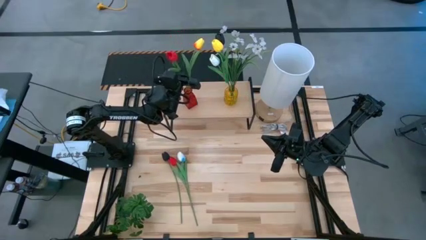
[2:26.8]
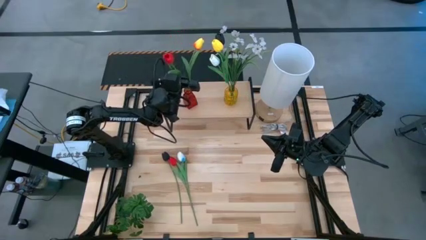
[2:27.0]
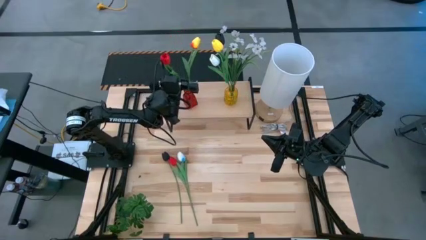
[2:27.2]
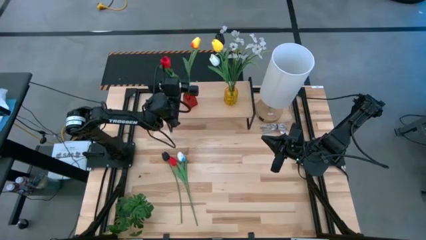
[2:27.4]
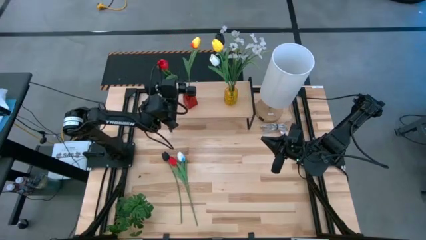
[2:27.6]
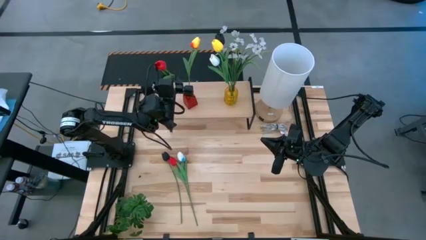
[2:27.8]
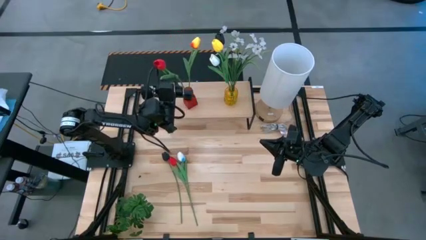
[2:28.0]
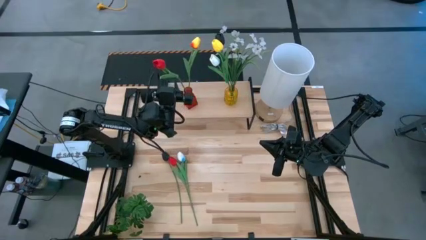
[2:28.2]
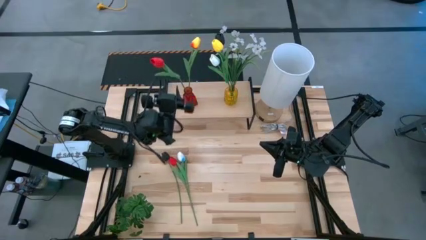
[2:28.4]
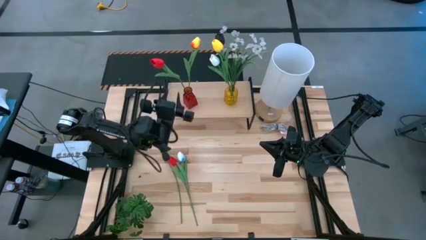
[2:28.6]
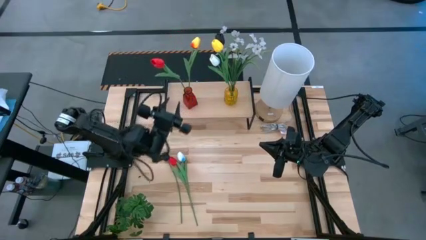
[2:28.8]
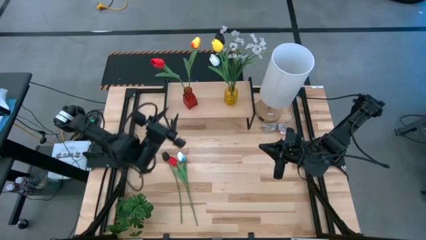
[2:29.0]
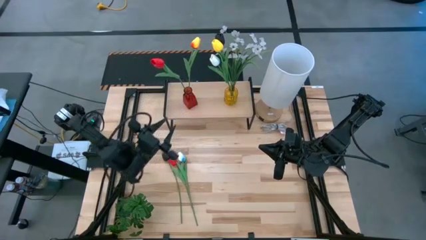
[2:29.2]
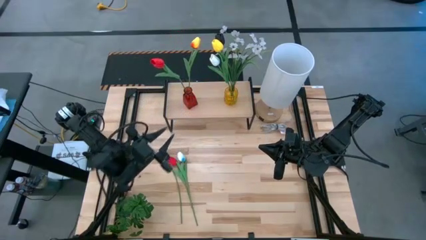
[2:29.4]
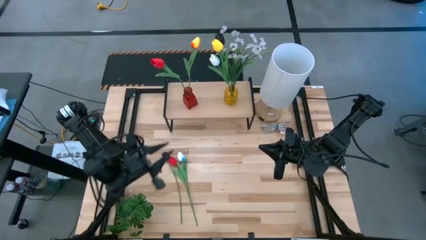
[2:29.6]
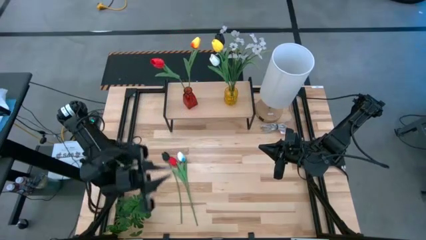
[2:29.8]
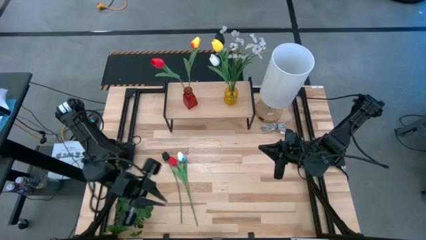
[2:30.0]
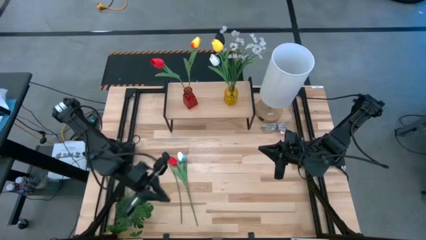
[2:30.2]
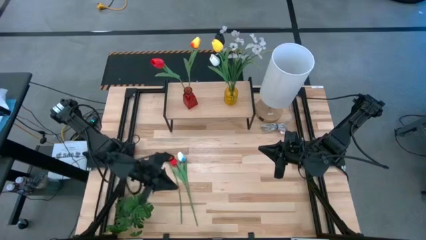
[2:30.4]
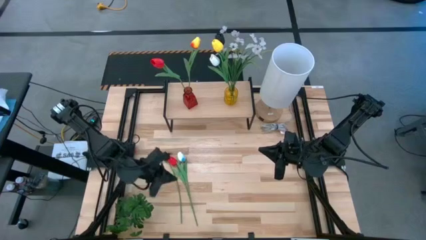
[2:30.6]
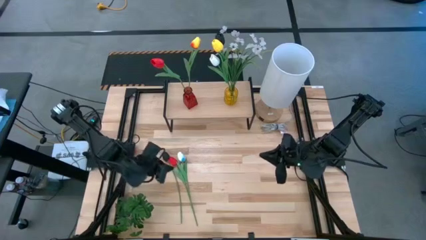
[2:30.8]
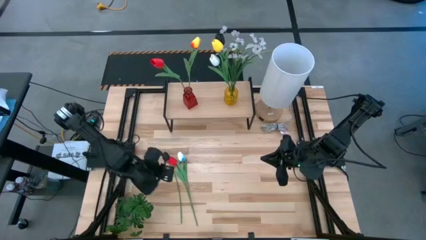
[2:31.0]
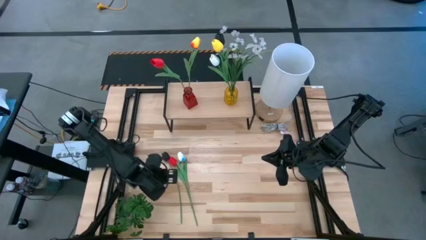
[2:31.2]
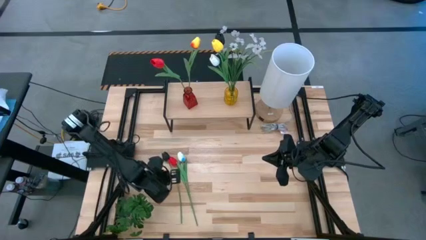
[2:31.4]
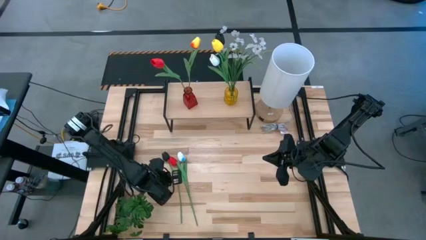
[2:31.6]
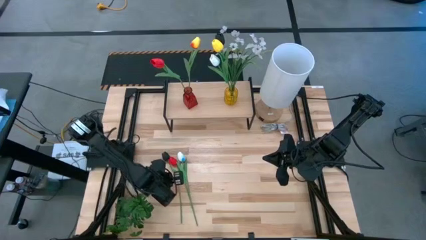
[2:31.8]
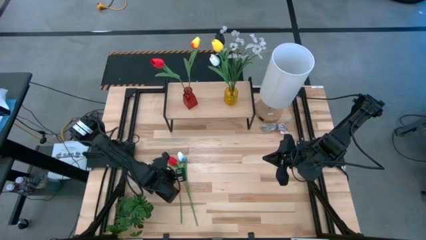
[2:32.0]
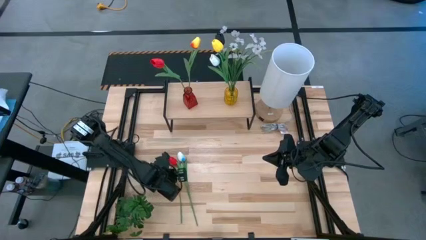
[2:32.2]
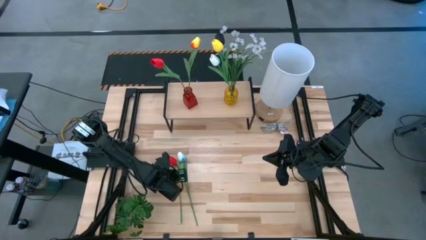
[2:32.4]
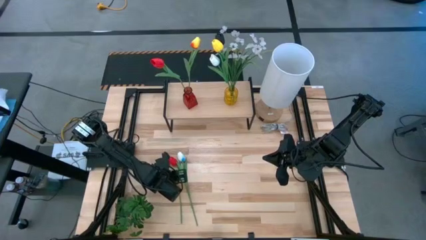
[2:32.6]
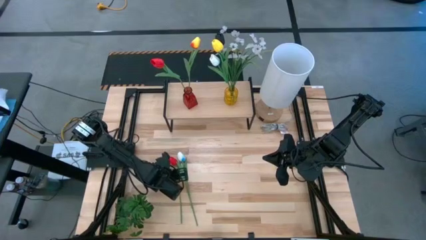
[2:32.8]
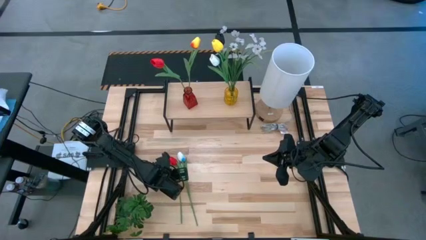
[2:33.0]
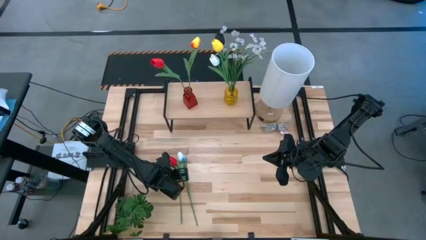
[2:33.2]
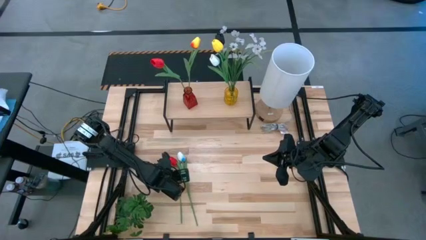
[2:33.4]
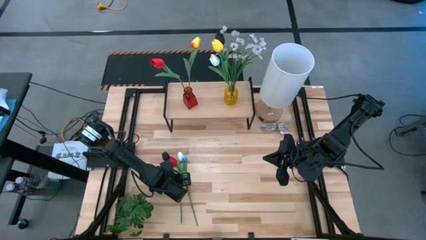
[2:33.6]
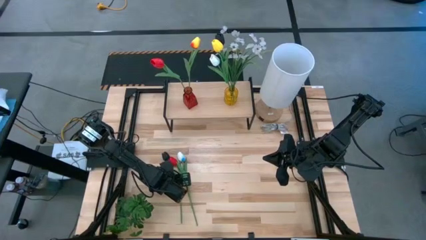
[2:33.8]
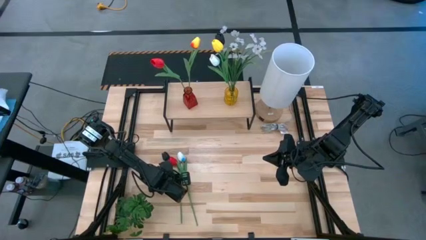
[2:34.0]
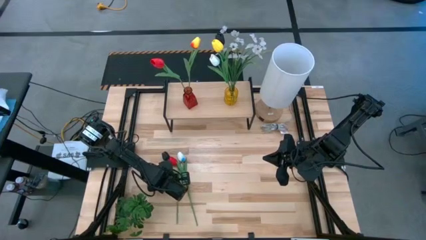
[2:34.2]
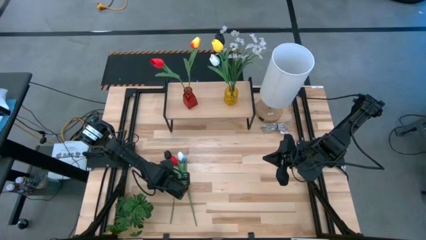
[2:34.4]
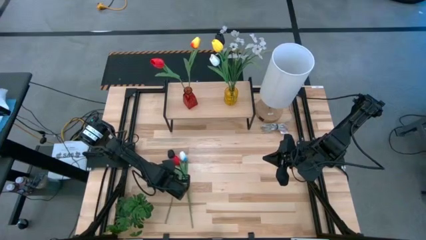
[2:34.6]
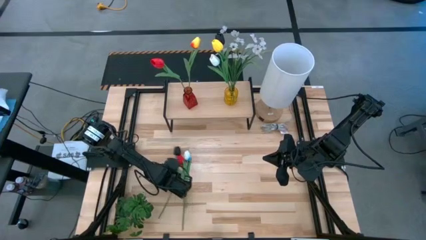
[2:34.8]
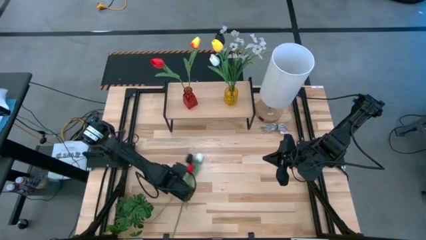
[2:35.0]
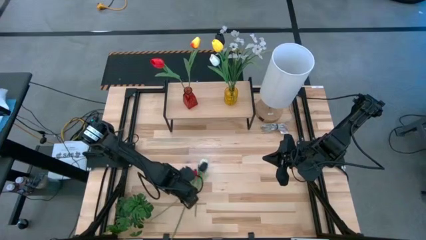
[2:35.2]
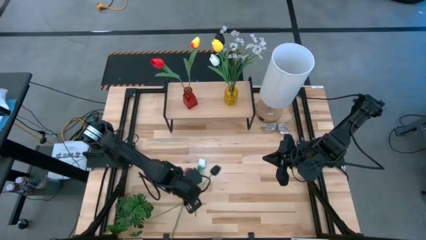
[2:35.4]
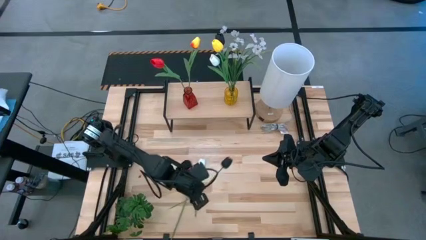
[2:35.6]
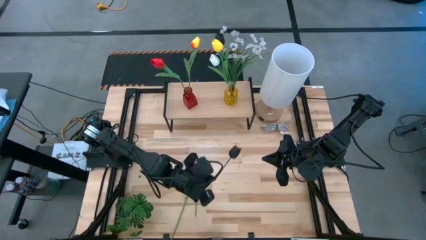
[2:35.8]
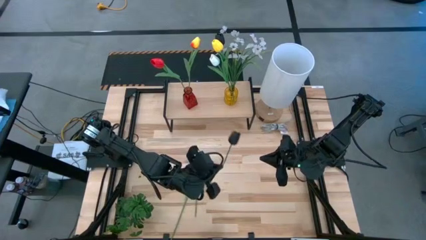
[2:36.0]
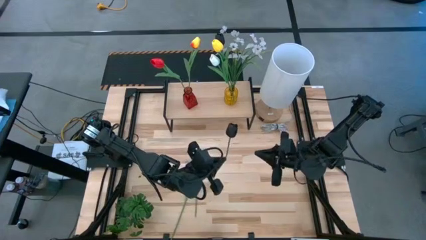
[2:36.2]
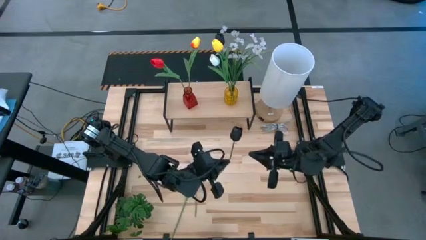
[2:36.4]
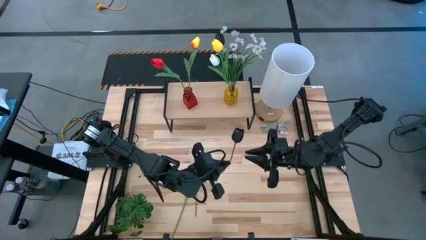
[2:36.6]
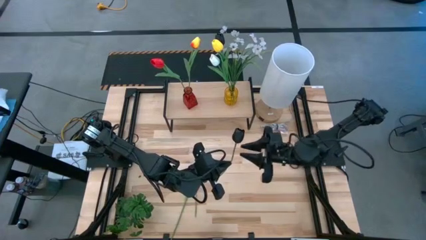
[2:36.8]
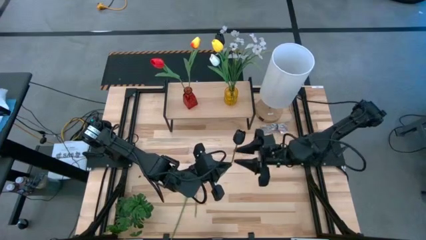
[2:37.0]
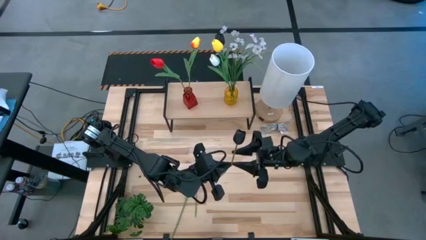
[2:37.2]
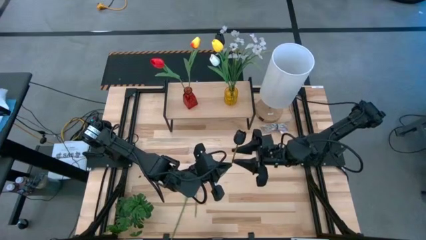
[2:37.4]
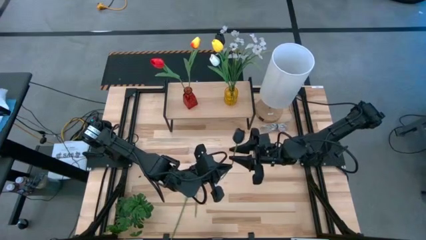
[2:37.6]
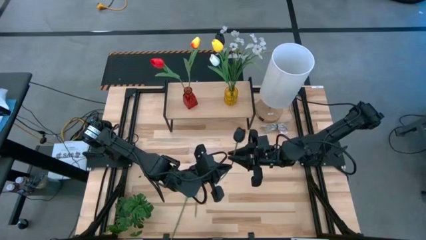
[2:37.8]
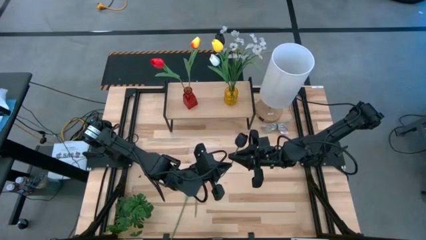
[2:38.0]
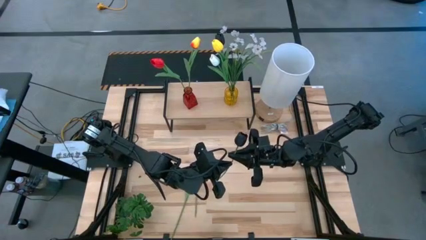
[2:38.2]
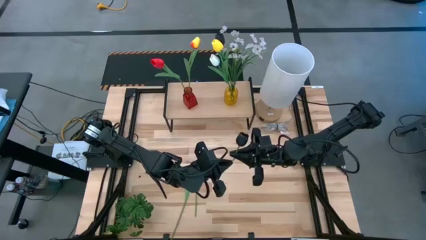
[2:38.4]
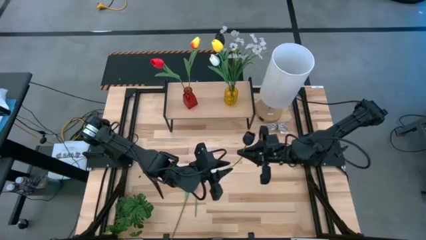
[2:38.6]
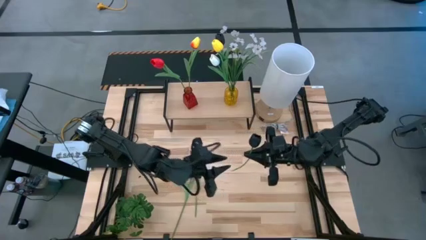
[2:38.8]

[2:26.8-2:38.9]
Task: Pick and place flowers into a vace then onto a shelf
Put the black tulip into the red flower vase

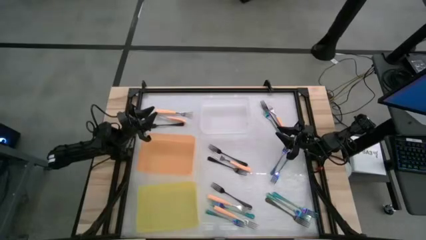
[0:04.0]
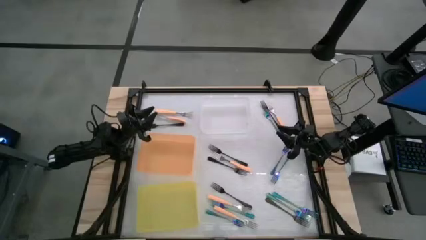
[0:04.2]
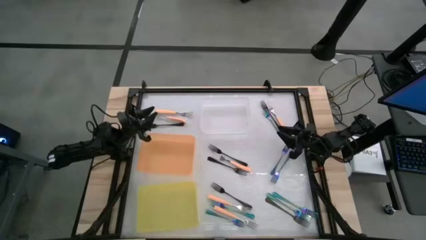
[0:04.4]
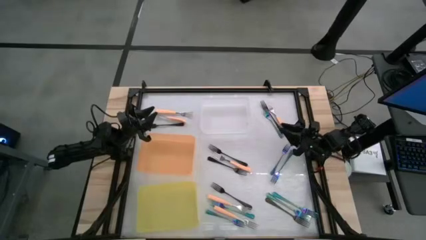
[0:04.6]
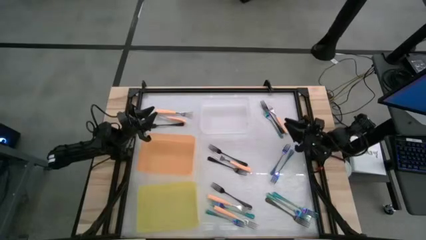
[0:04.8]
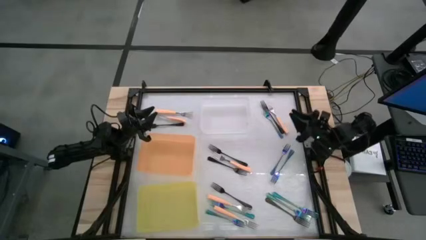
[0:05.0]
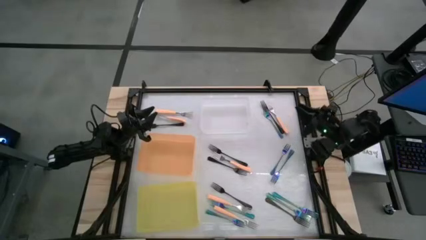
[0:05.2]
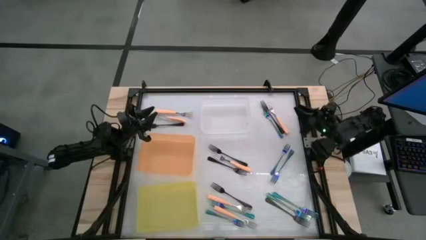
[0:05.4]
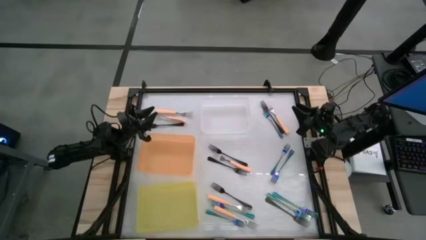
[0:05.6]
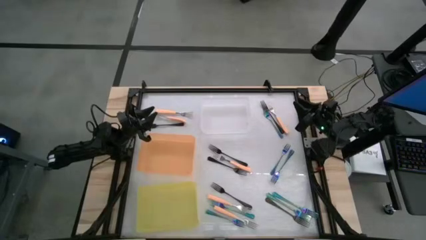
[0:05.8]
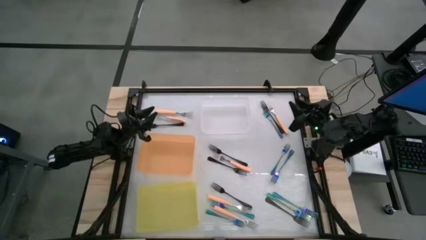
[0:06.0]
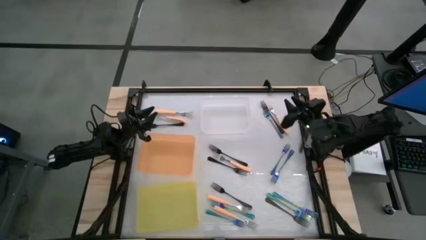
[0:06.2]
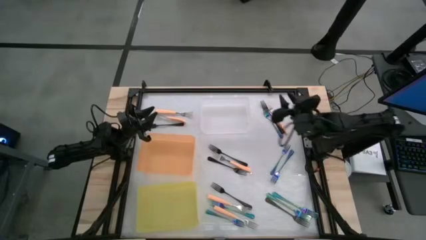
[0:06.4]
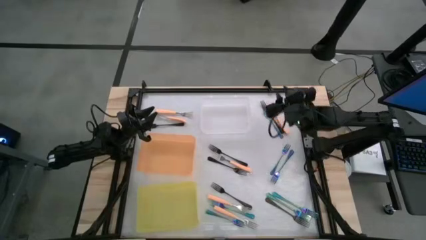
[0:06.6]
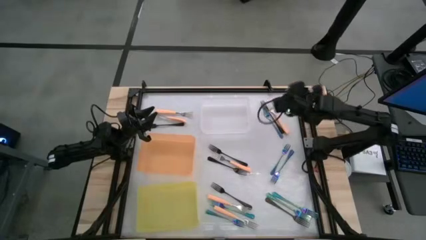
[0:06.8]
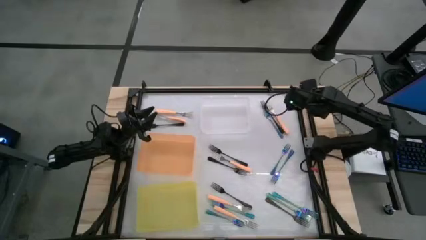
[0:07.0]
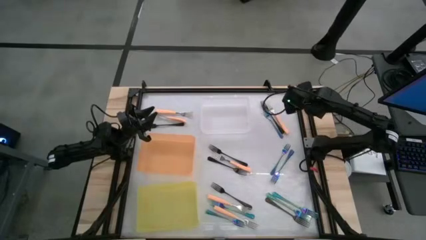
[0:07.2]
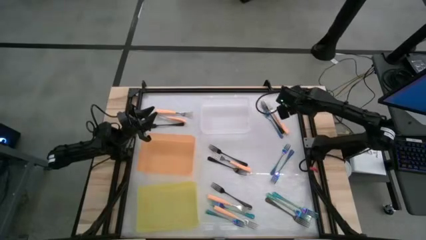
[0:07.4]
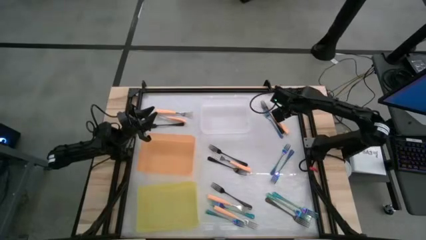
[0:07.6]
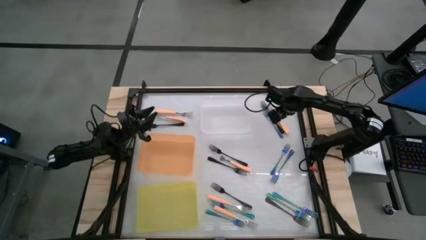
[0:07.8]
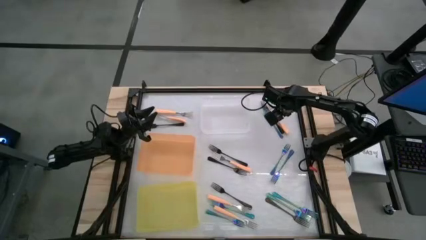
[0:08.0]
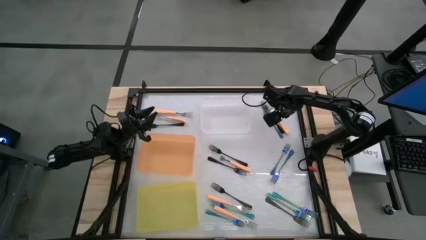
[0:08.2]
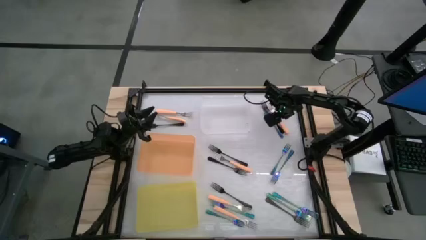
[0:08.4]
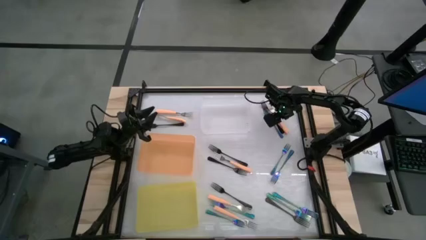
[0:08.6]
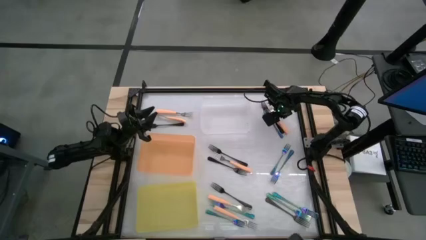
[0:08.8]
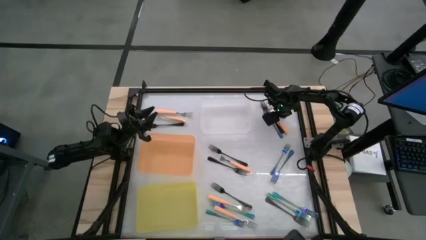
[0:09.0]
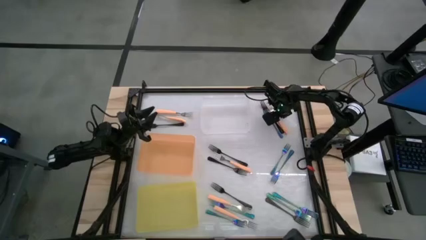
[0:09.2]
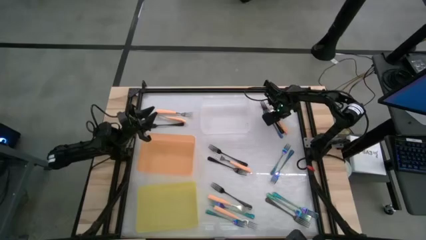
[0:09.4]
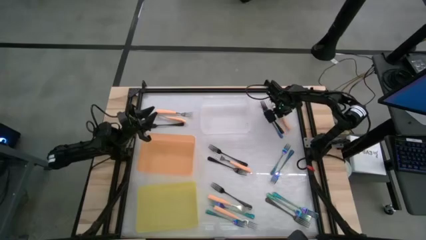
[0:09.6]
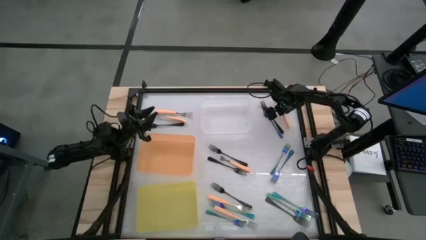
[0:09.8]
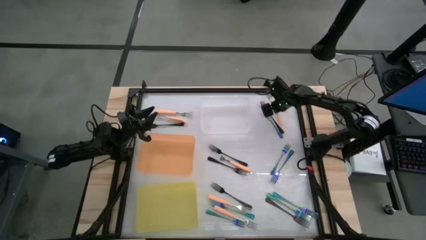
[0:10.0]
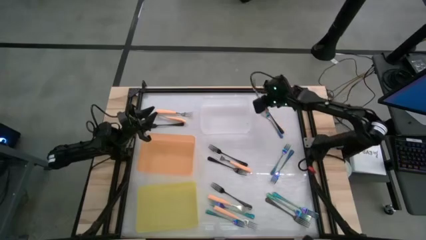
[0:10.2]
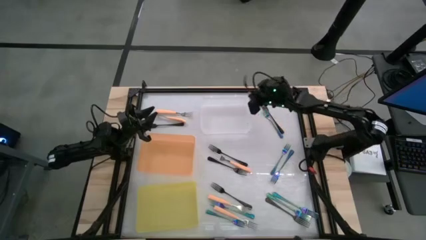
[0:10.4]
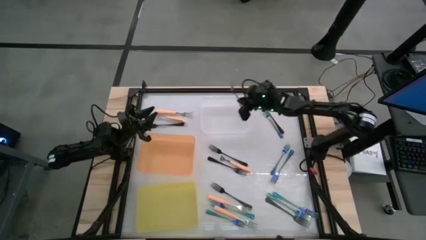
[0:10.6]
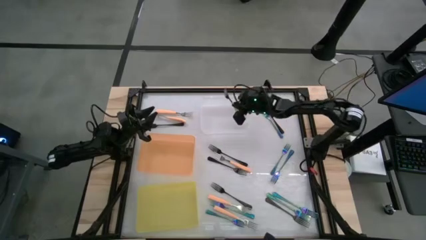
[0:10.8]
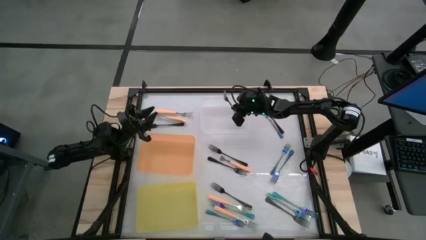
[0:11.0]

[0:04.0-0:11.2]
Task: Sort silverware by color (type)
Put the orange fork into the transparent bin
